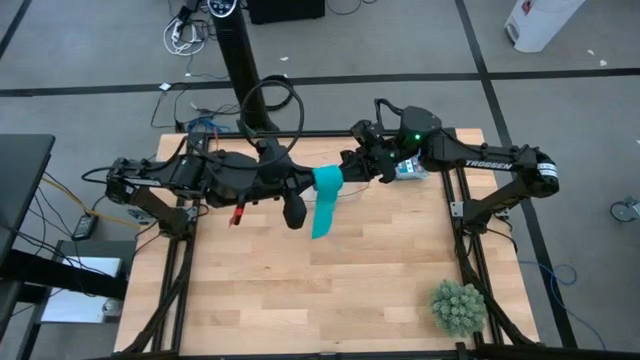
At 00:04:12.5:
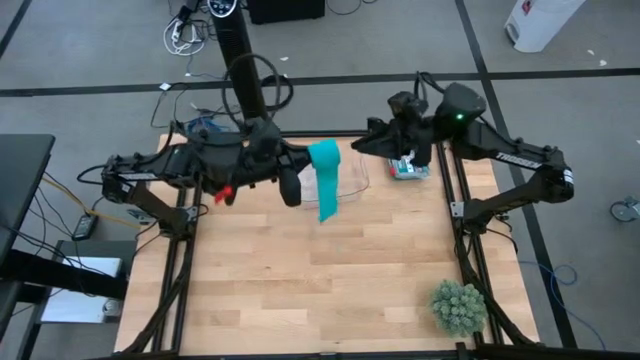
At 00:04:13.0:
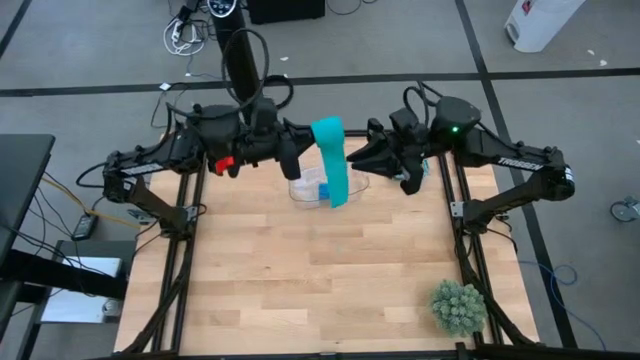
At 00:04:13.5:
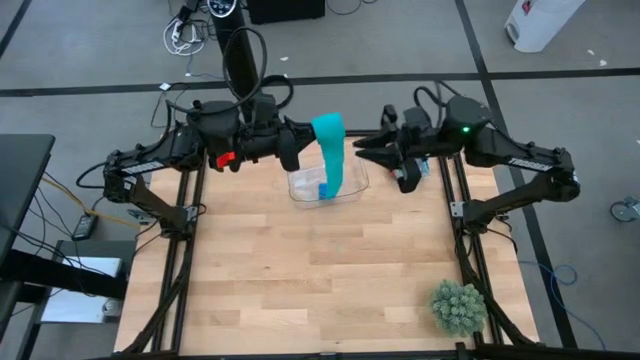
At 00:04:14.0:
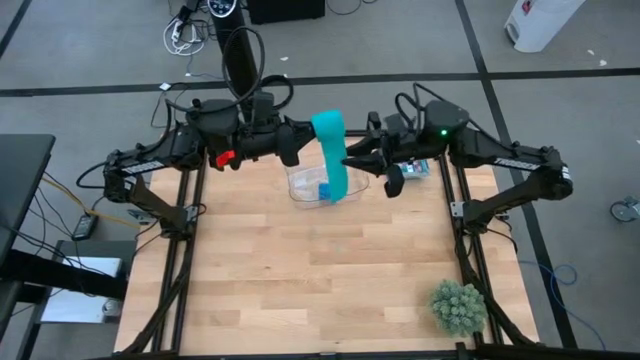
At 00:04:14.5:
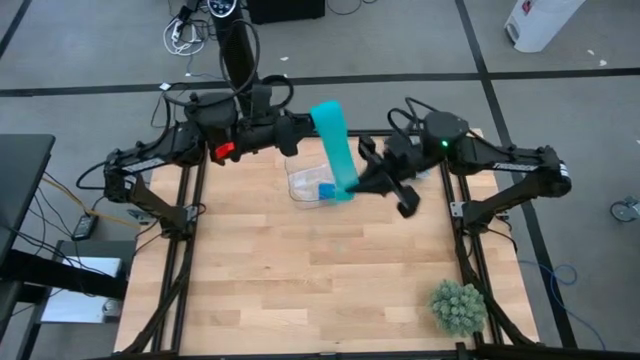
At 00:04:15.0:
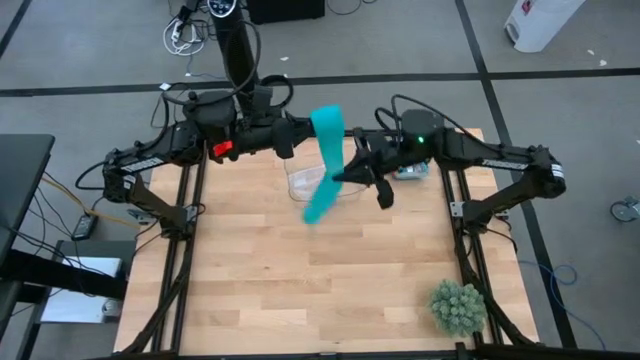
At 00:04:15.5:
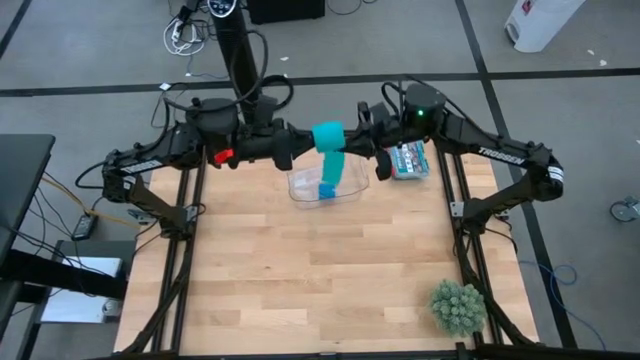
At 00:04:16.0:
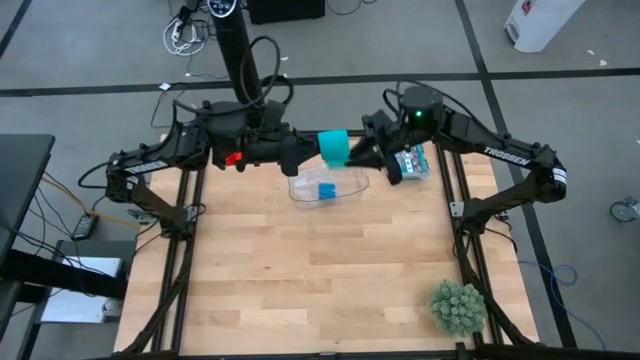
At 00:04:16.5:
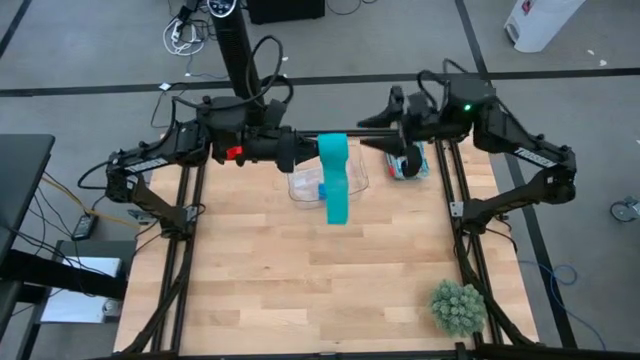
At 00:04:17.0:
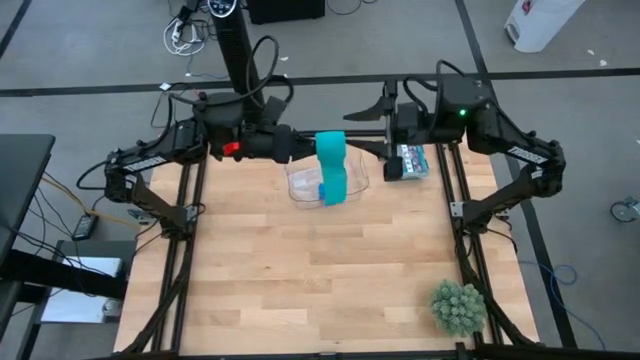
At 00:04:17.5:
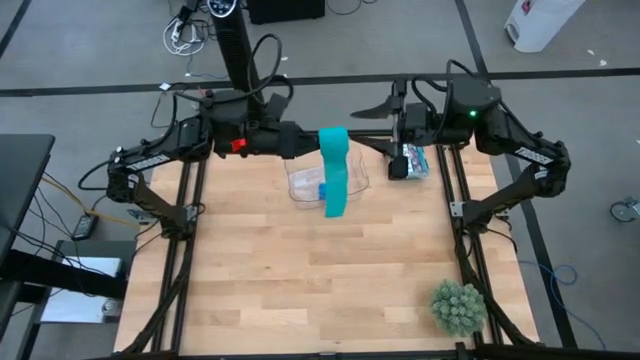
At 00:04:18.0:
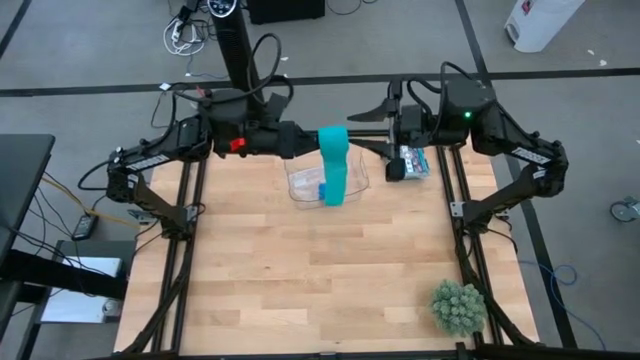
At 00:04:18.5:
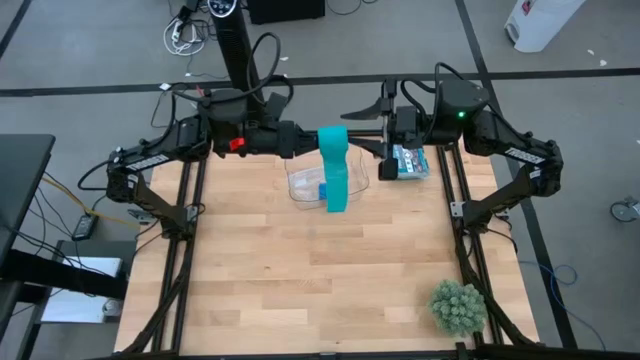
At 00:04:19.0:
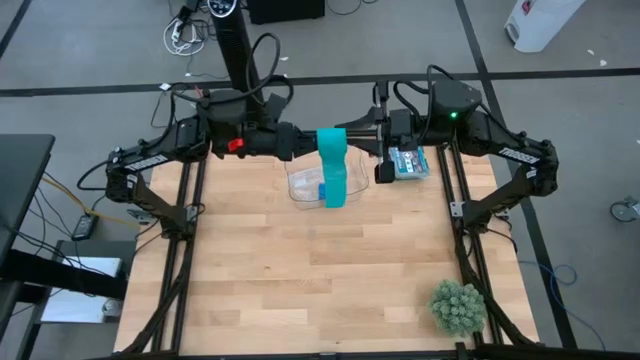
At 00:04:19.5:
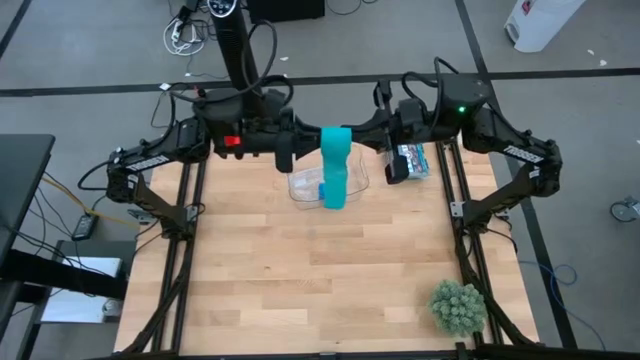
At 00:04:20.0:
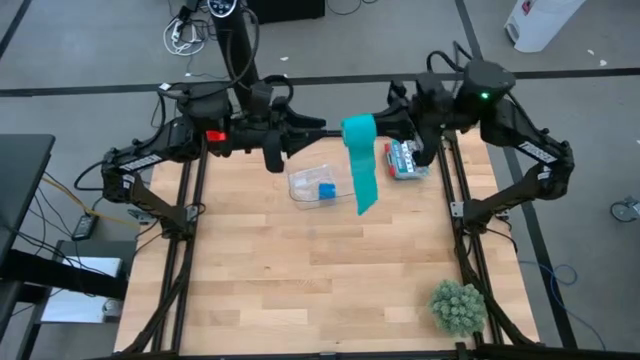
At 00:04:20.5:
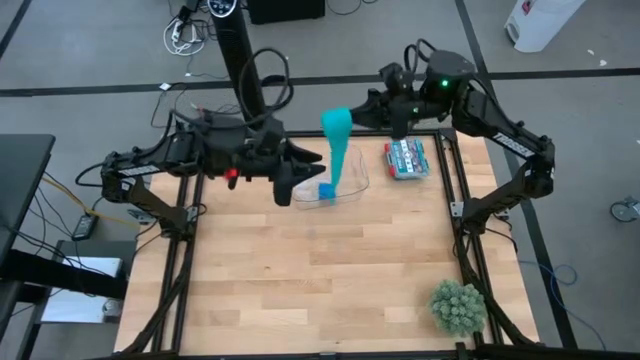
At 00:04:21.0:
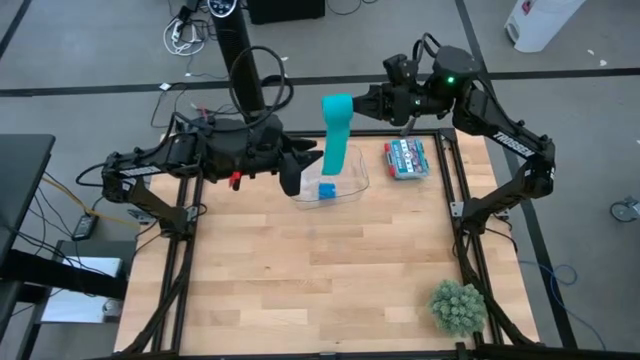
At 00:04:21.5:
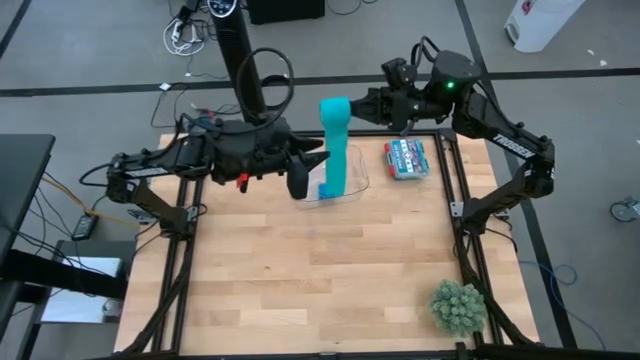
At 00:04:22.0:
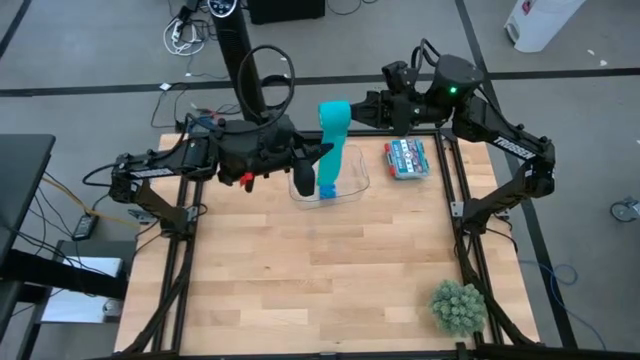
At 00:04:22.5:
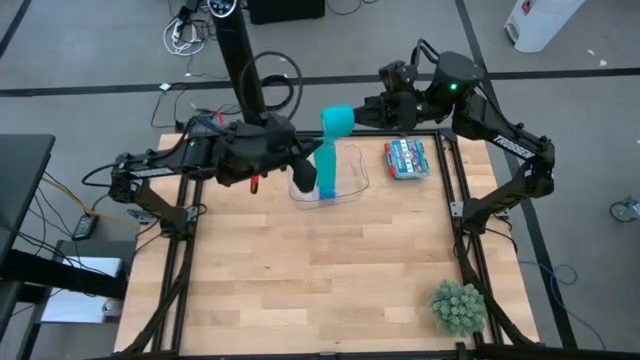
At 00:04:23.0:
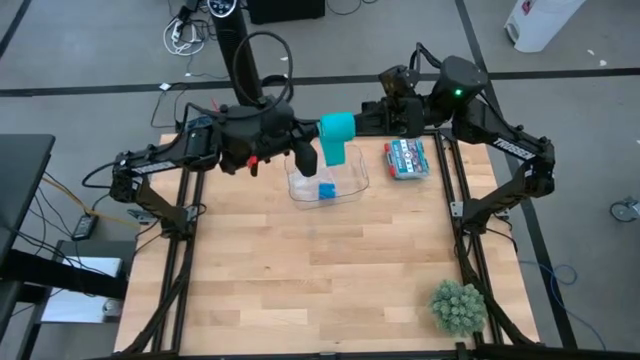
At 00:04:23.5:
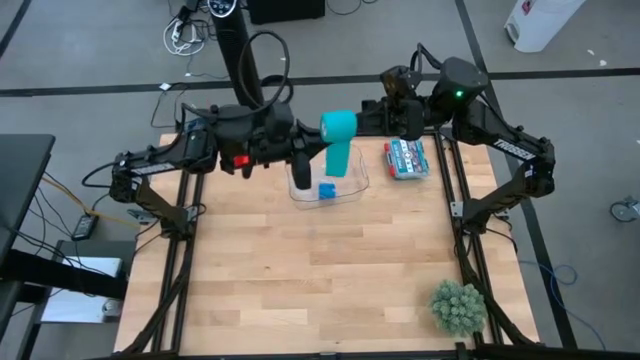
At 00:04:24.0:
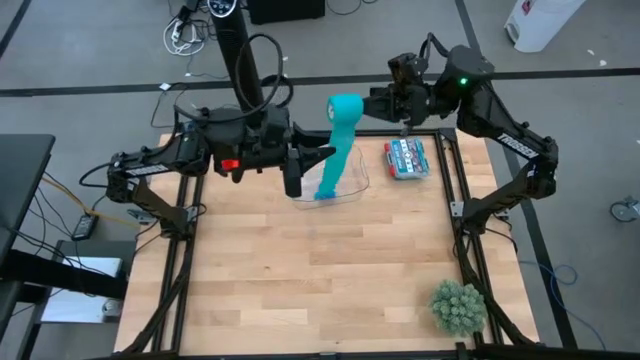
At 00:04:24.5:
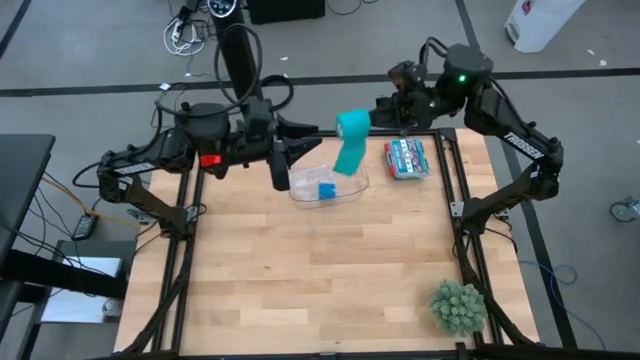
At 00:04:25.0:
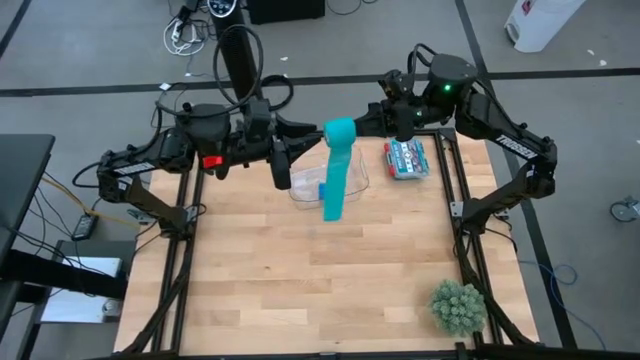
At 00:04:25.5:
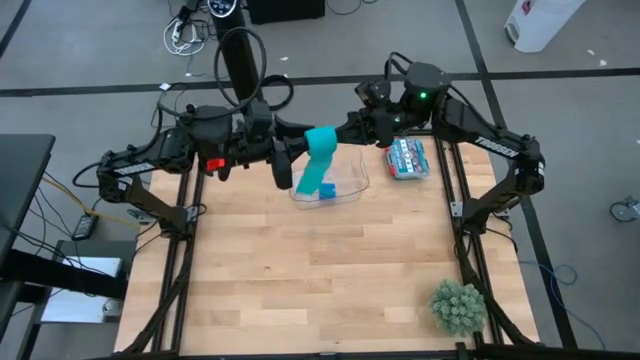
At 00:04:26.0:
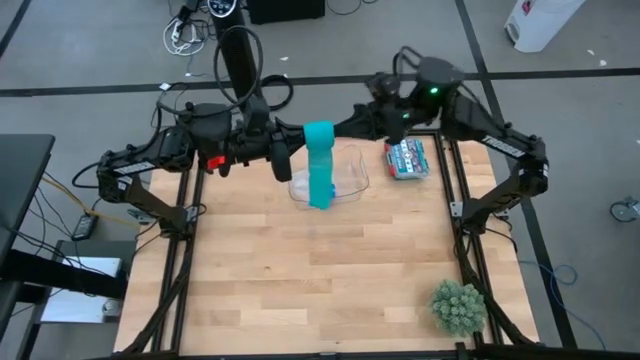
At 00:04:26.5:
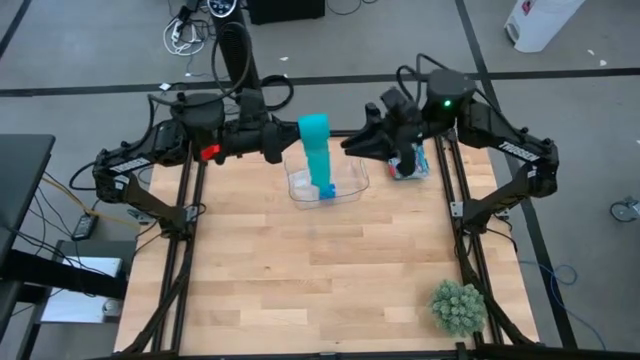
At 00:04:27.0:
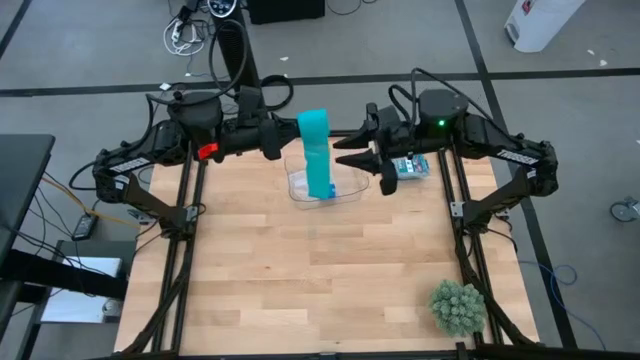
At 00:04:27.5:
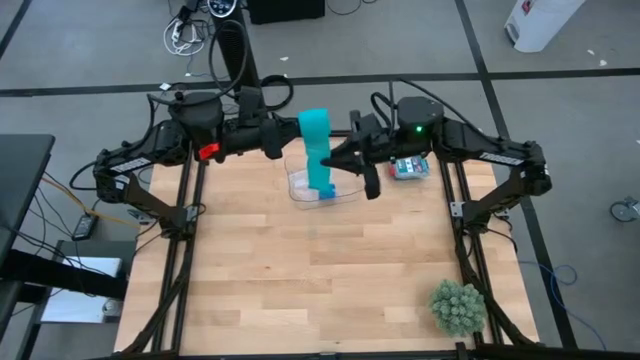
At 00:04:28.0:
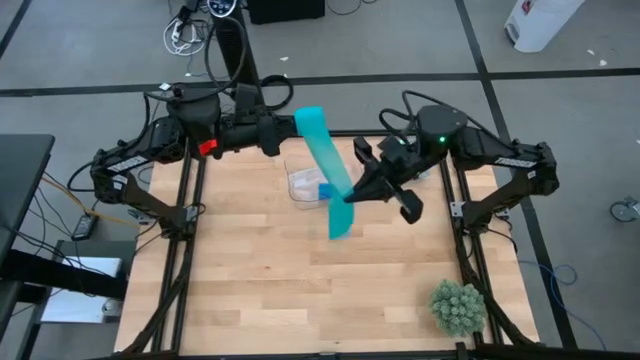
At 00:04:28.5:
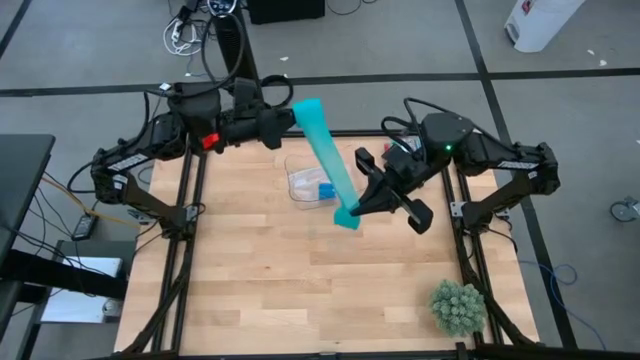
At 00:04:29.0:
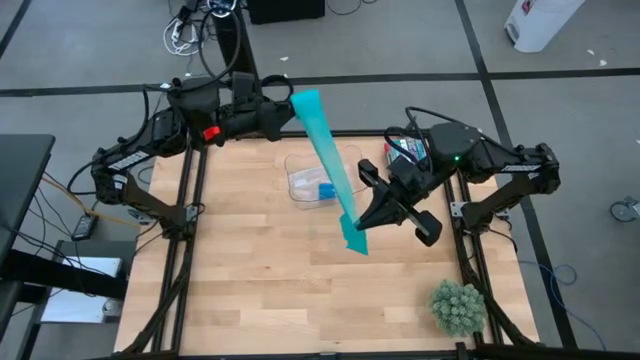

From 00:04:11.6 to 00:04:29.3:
Task: Roll bandage
Roll the sky blue bandage

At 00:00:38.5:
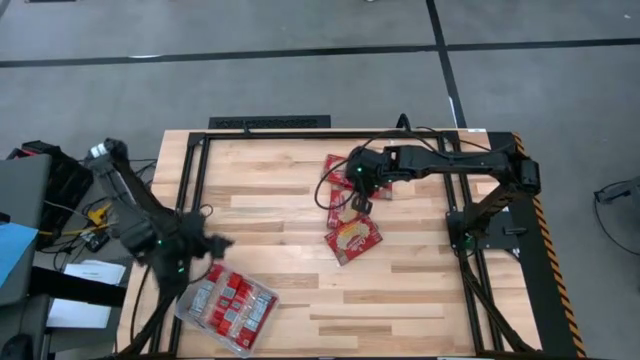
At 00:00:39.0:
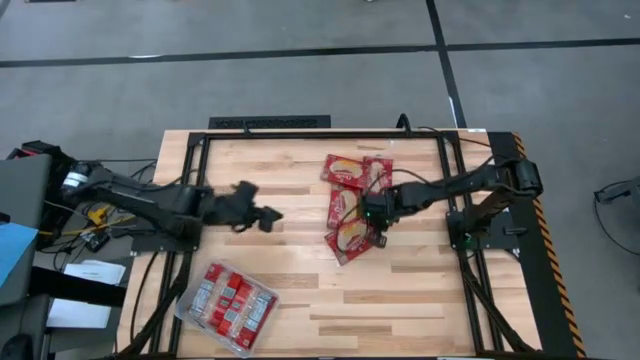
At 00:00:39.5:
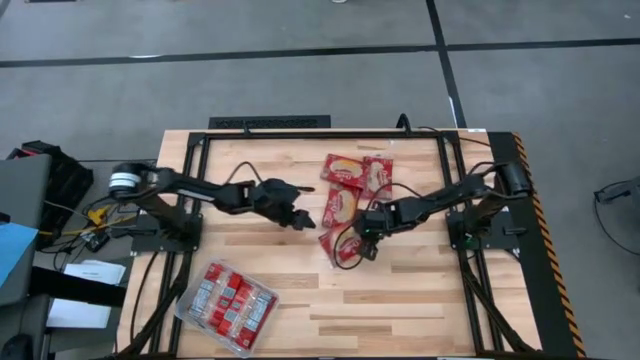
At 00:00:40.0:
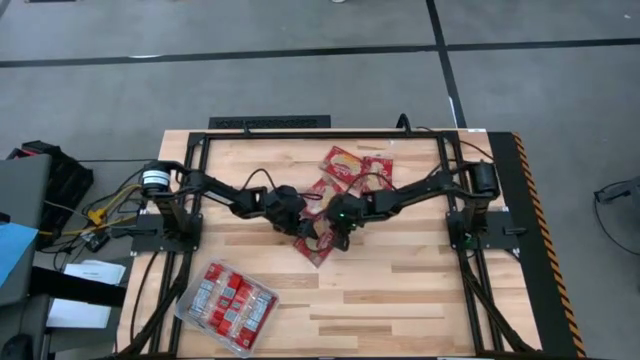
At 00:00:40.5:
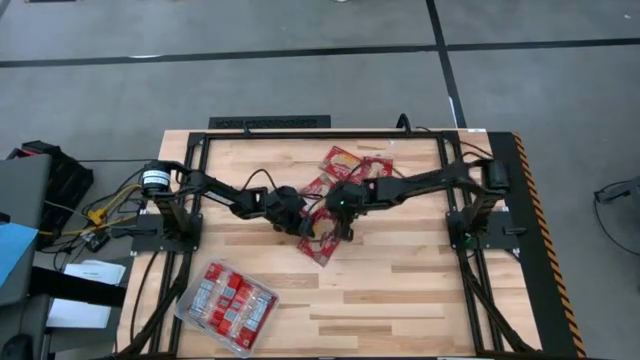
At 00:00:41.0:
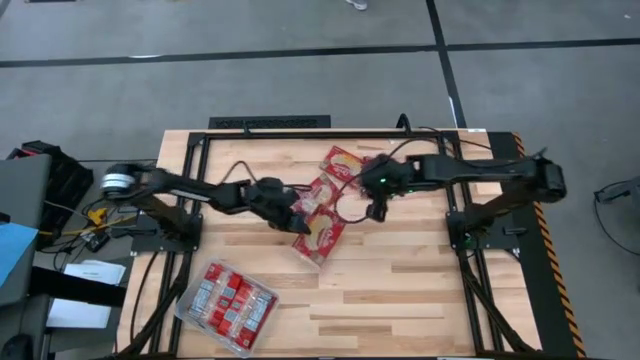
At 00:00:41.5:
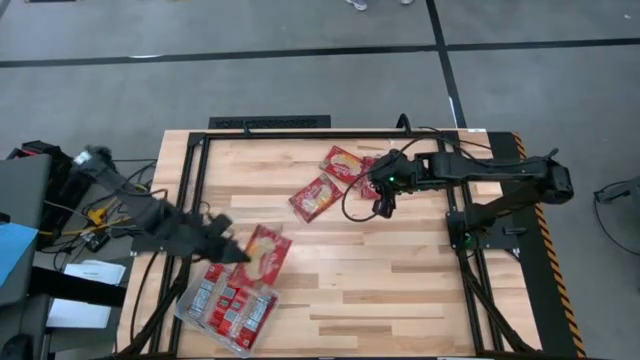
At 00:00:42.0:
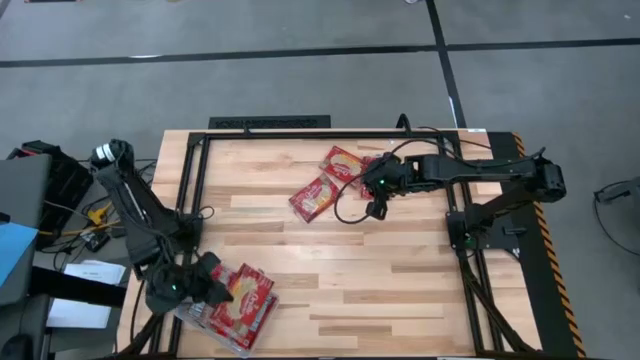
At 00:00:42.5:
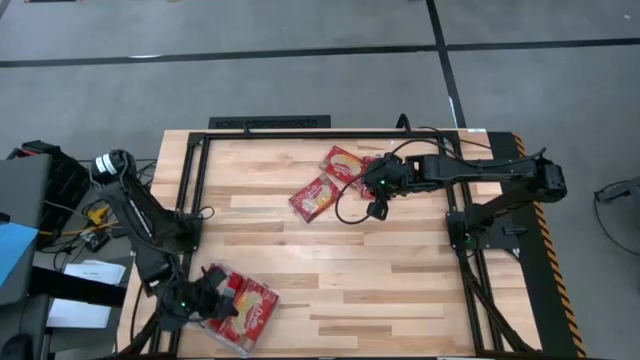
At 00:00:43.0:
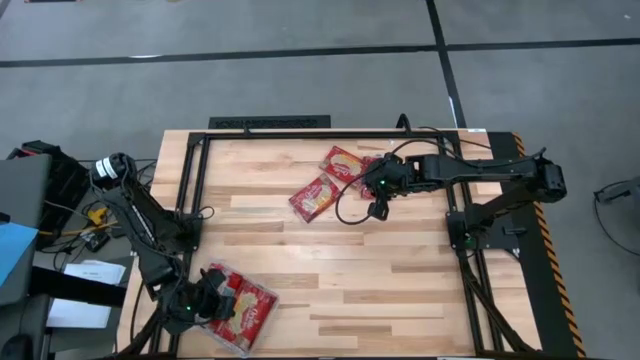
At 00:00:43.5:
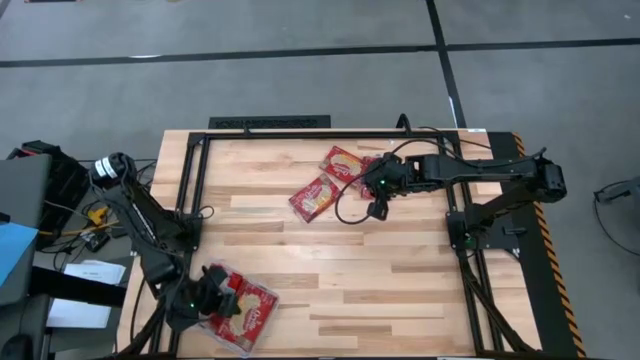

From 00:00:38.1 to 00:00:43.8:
Task: Sort popcorn bags into baskets
Put the red popcorn bag into the transparent bin
